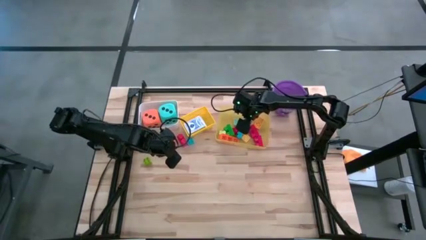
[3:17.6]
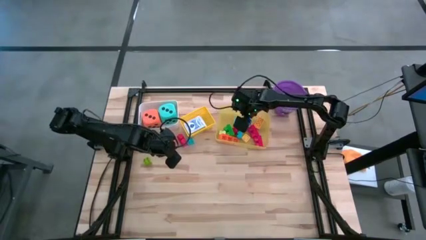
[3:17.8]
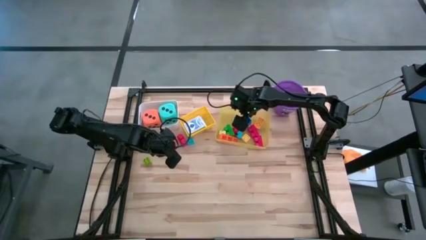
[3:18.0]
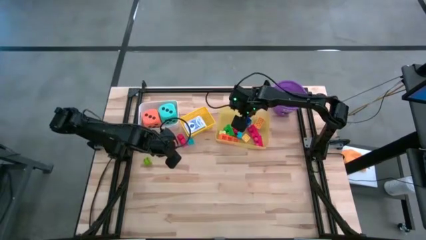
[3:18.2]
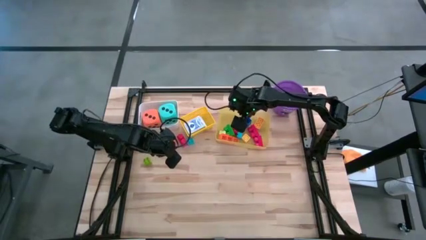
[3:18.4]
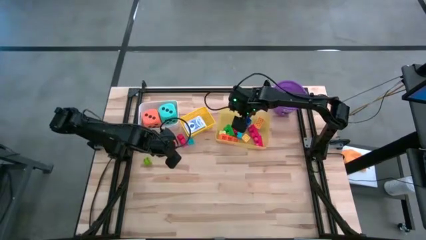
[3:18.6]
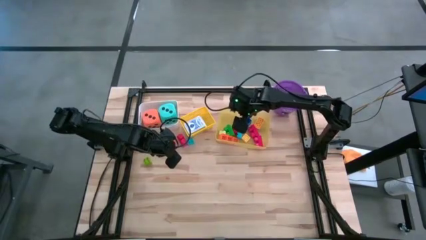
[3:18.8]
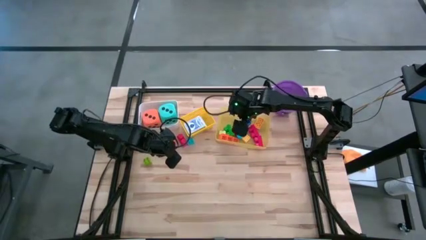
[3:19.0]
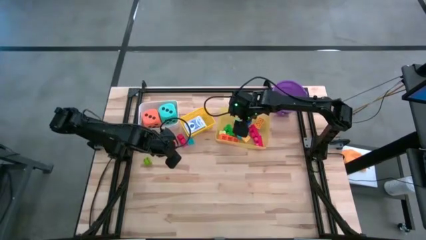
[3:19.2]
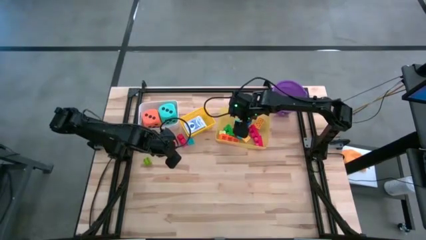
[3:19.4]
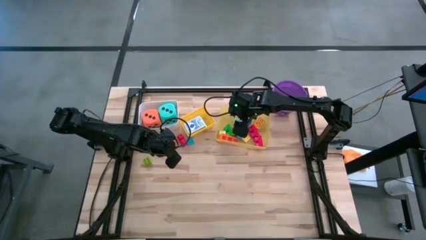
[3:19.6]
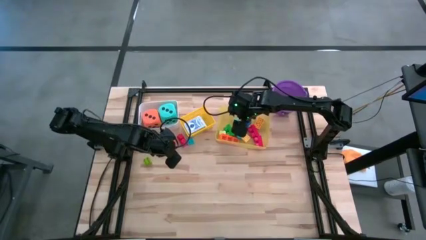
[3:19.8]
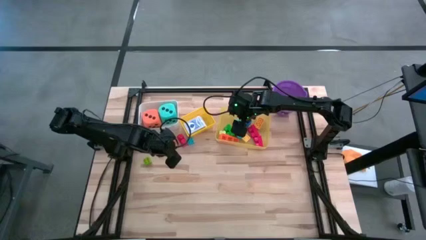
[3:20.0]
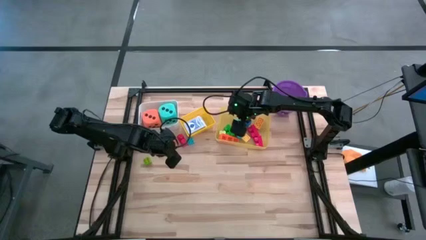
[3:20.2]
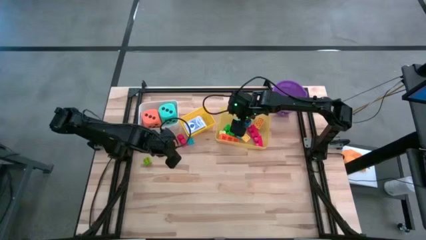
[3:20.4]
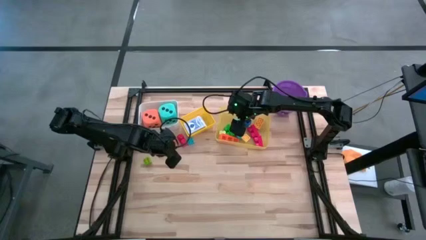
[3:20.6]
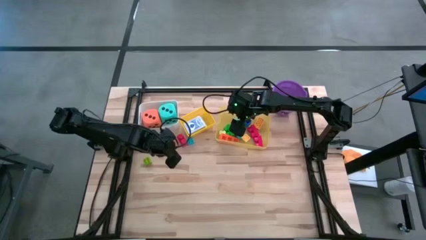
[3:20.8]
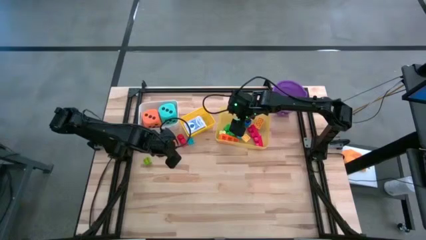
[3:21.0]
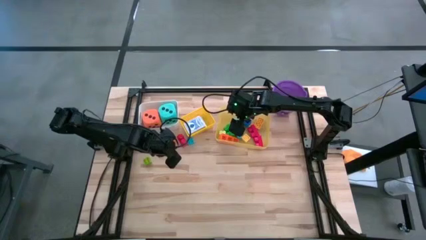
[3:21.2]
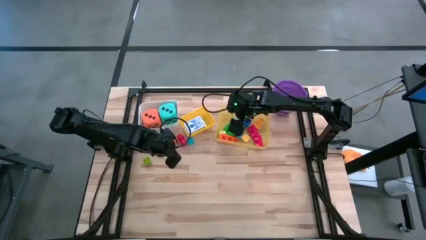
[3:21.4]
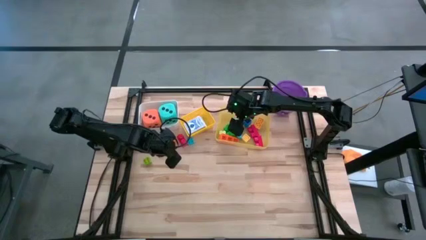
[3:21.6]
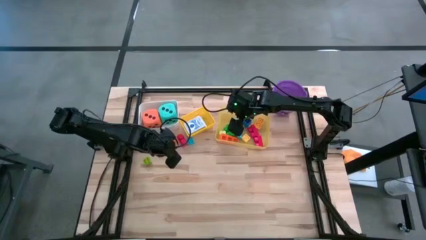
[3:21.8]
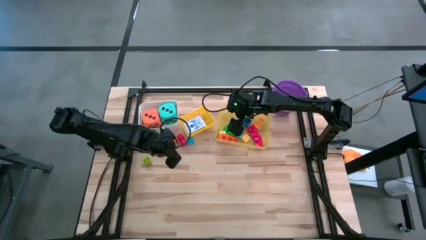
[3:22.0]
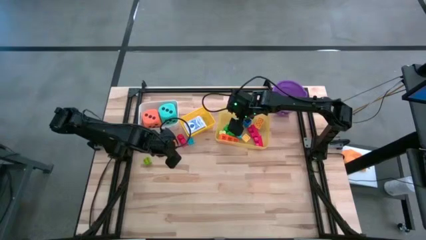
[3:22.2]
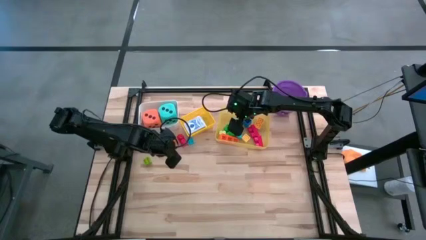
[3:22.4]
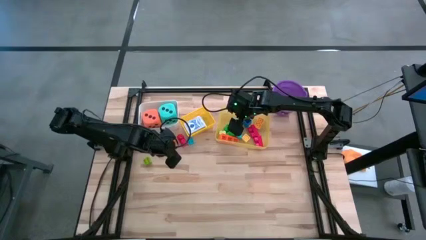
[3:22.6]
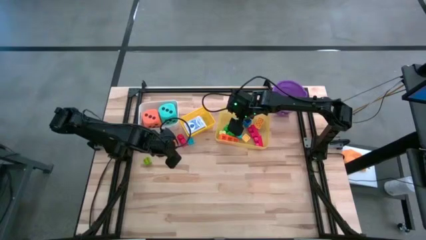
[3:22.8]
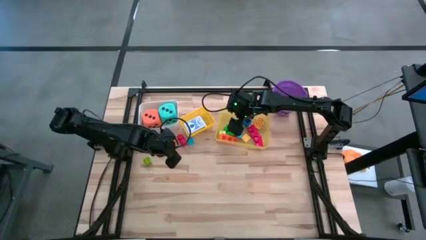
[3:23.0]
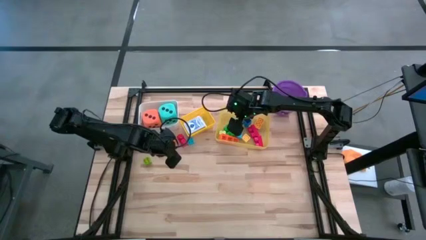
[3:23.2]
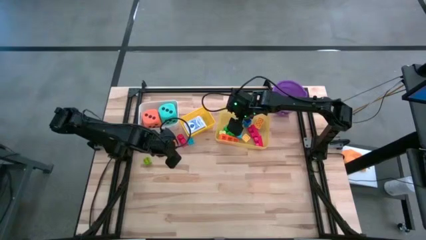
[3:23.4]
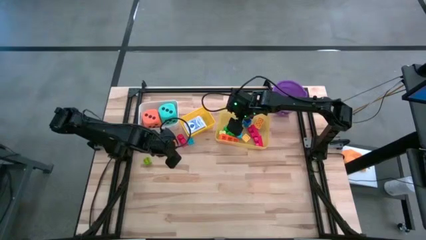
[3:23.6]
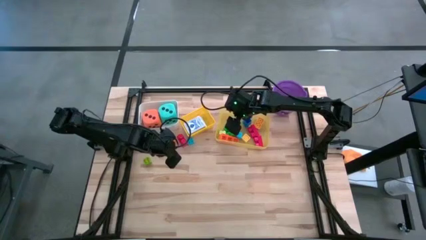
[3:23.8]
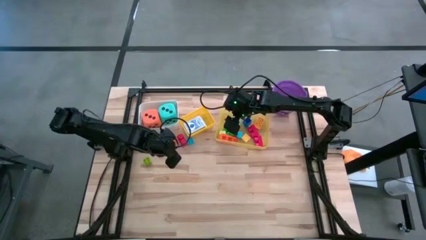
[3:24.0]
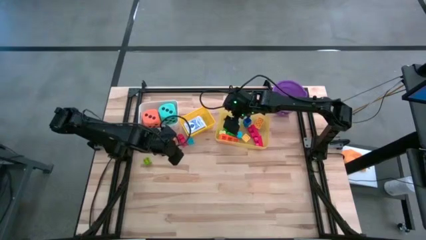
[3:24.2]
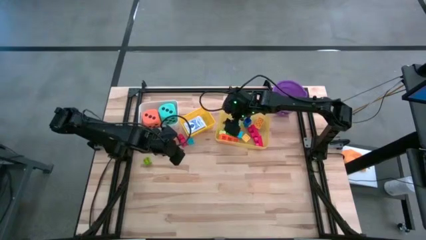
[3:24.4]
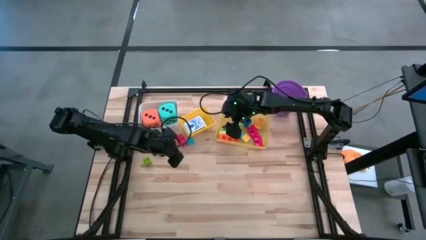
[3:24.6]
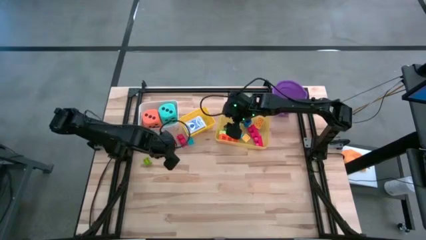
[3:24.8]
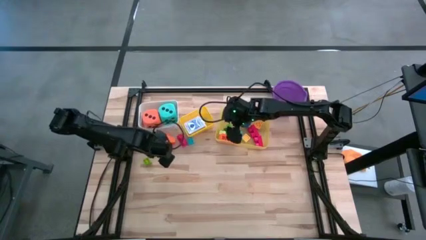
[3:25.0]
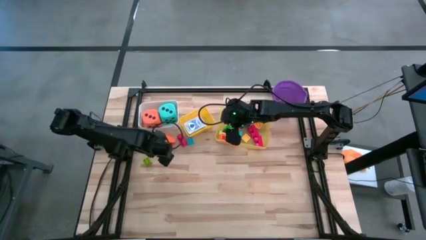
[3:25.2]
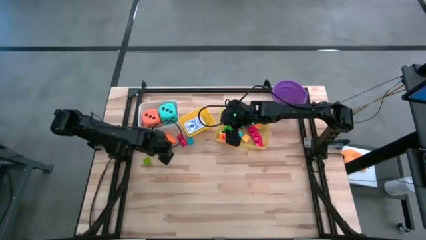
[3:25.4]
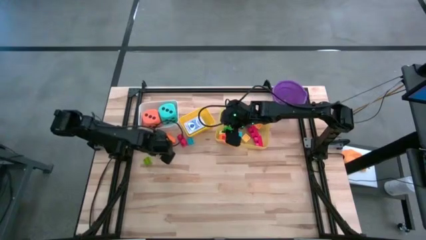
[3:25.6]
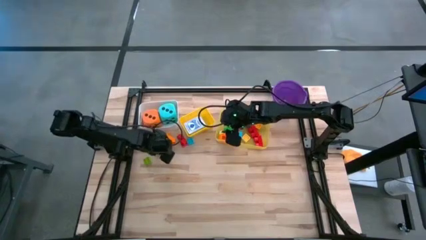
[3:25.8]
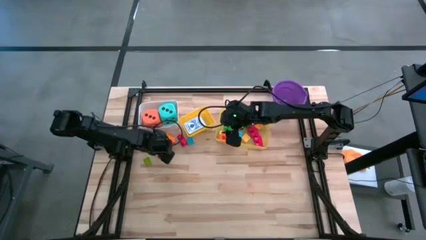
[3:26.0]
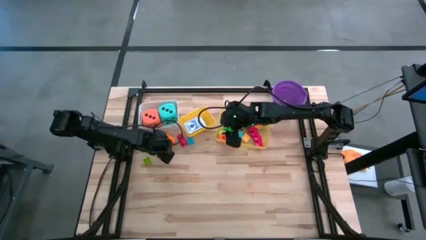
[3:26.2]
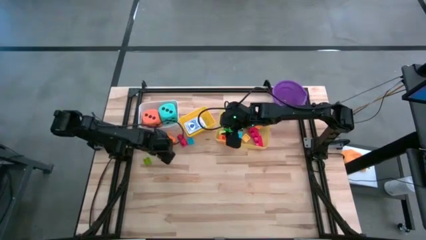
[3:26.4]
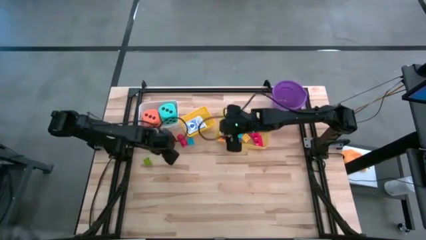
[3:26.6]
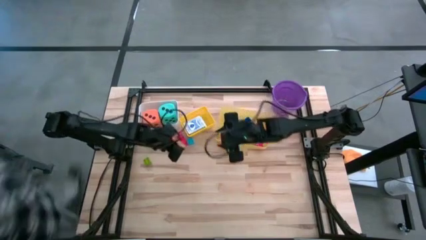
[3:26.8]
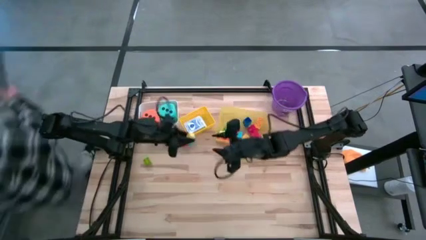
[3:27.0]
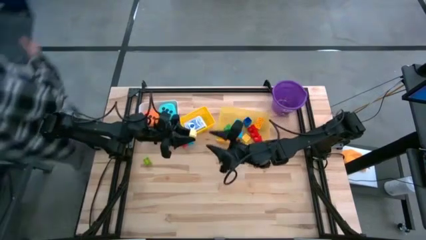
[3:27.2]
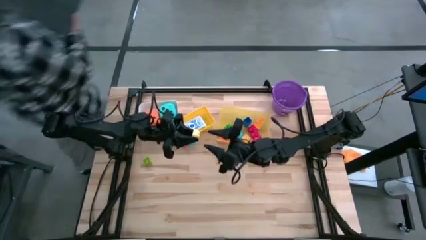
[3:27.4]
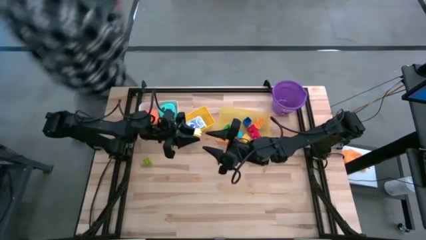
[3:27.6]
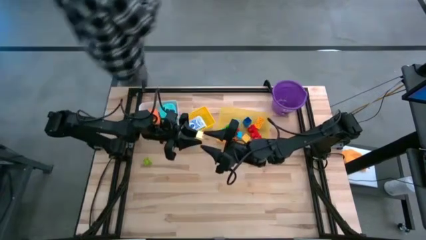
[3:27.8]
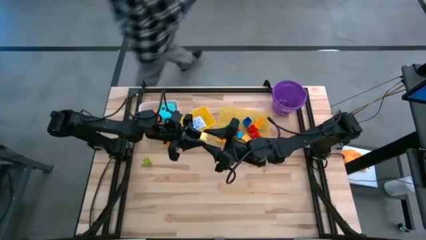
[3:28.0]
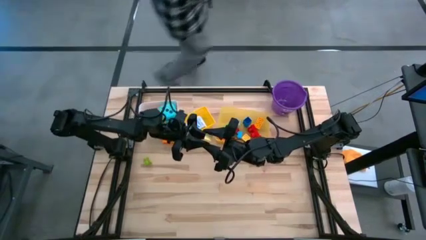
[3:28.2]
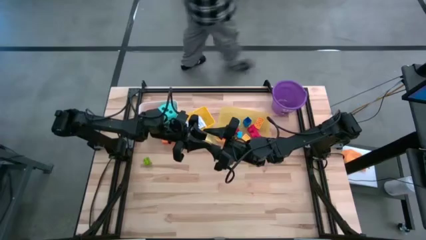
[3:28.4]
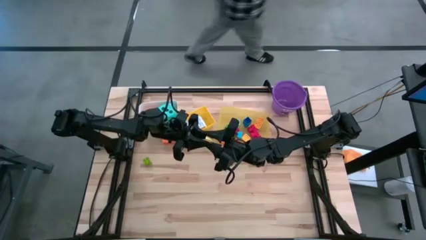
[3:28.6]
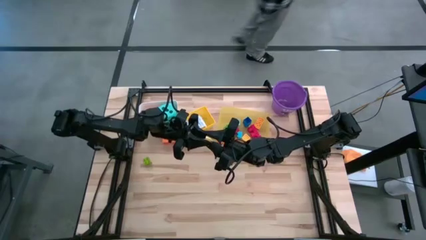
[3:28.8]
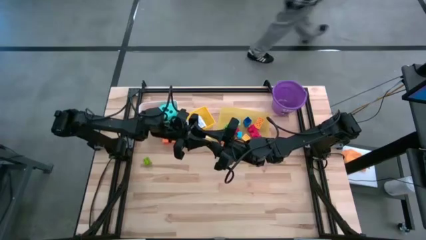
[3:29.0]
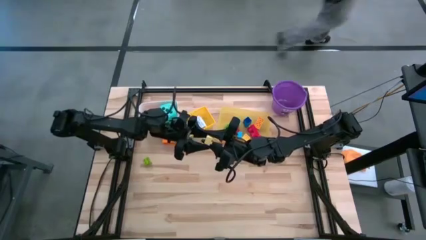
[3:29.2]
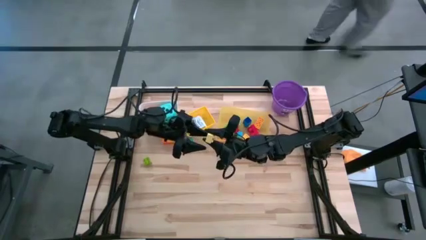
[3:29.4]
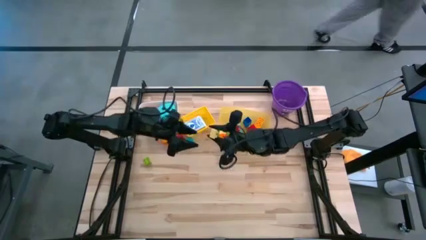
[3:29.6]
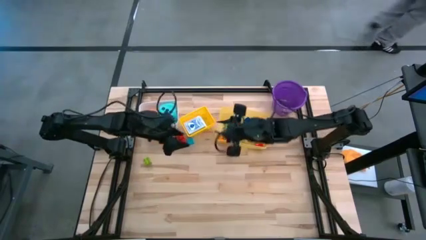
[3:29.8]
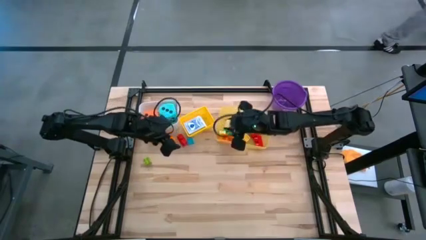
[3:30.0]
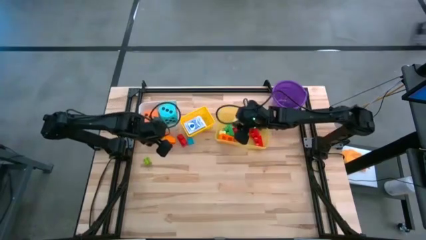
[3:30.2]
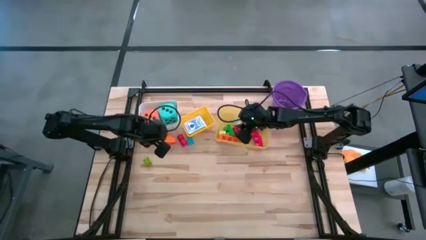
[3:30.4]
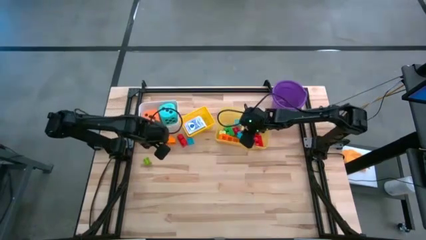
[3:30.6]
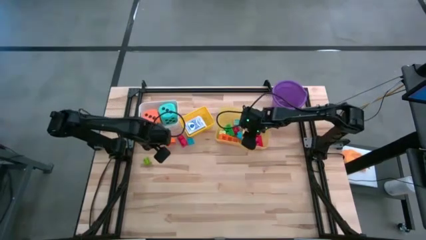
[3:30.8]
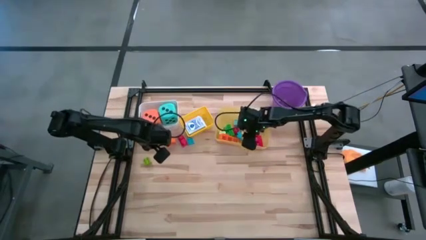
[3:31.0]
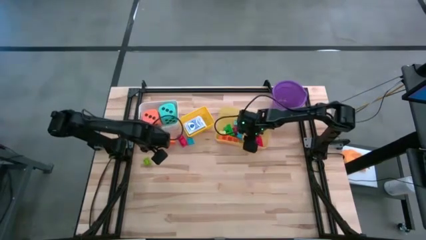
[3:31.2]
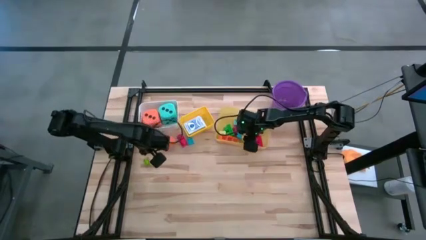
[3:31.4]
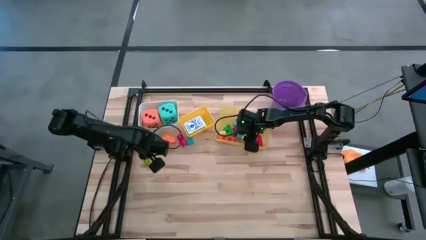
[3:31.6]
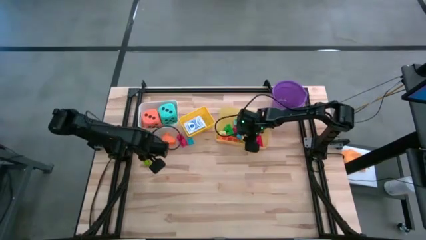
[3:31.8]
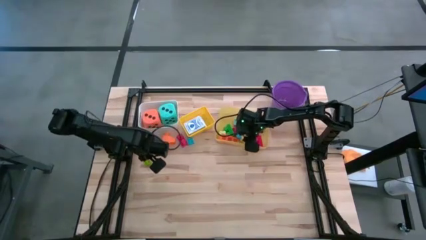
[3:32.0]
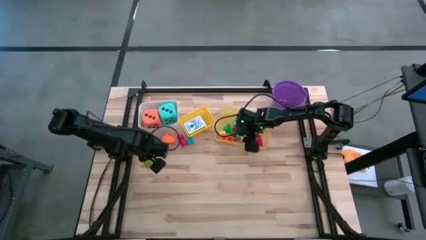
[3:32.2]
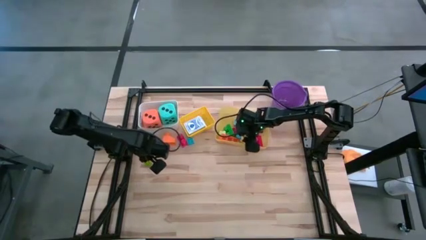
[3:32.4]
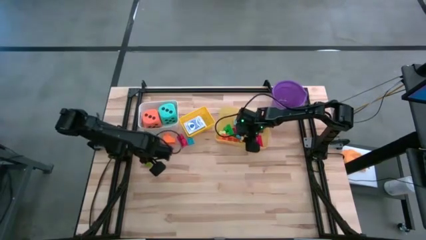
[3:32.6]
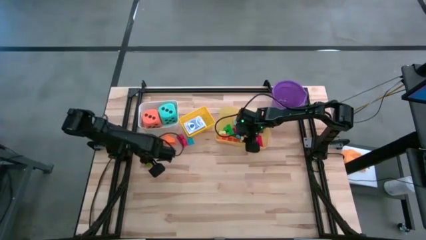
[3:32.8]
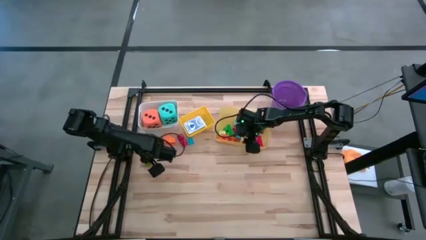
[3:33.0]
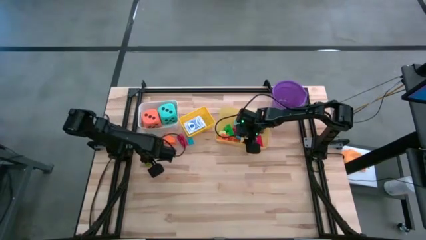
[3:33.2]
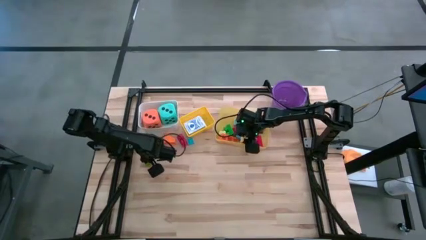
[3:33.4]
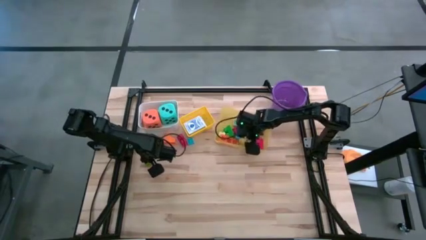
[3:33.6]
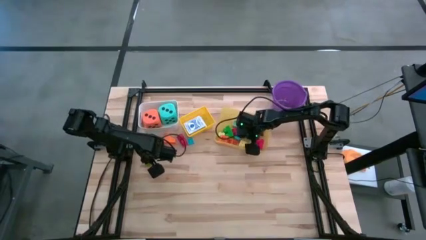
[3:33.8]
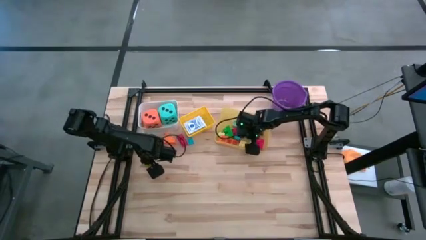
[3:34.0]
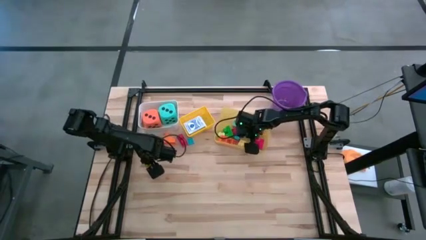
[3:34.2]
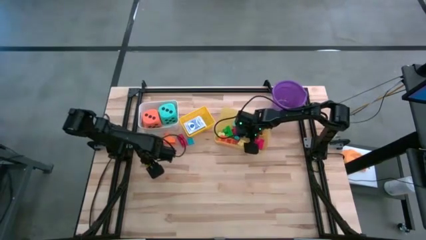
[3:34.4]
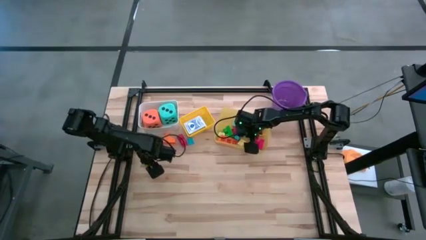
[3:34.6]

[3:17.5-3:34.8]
Task: Pick & Place Toys
Put the yellow game piece into the yellow bin

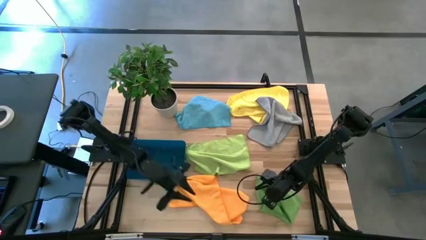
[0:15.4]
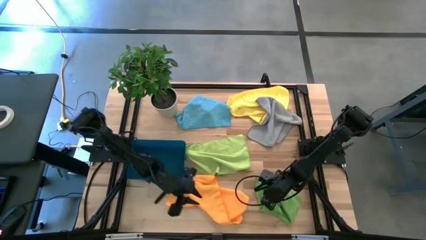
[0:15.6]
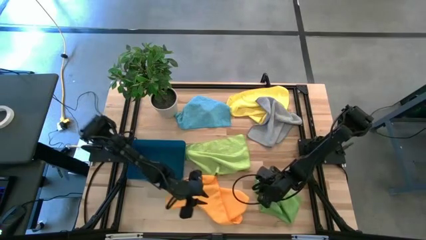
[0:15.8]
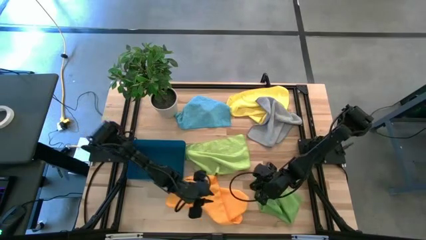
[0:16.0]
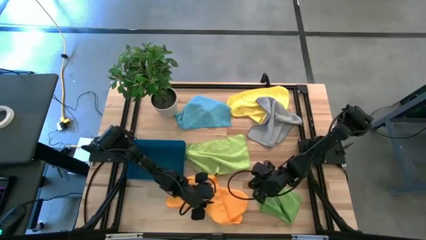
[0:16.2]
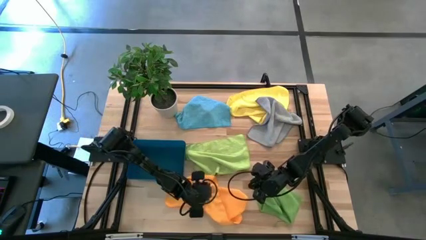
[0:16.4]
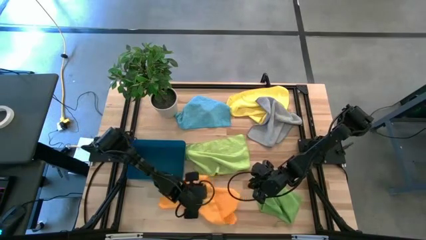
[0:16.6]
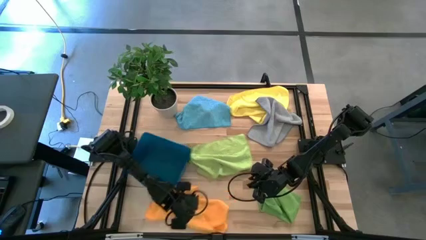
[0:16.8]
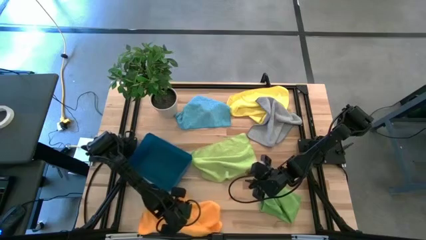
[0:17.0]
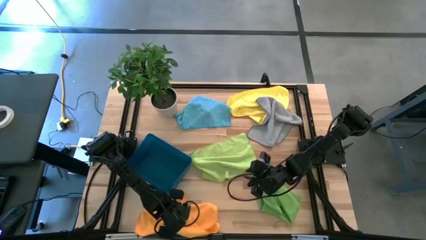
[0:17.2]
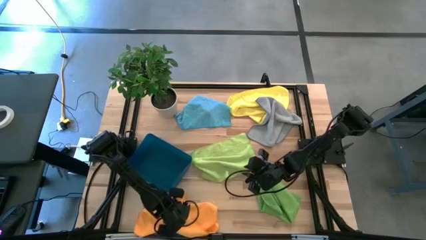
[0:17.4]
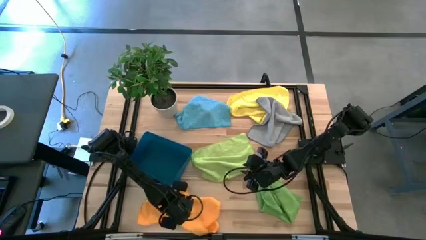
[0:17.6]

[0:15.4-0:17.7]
Task: Fold microfiber towels
Move the orange microfiber towel to the bottom left of the table
